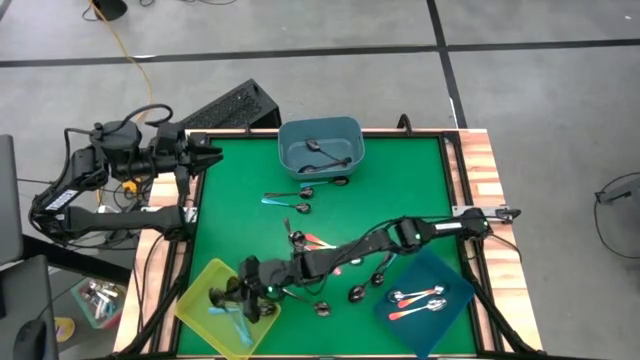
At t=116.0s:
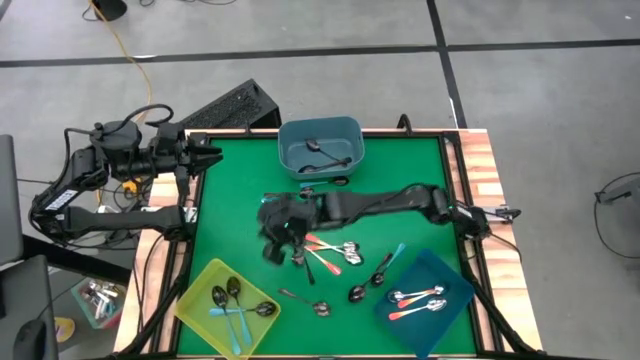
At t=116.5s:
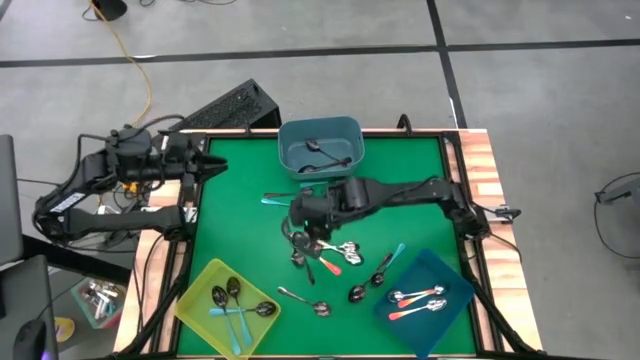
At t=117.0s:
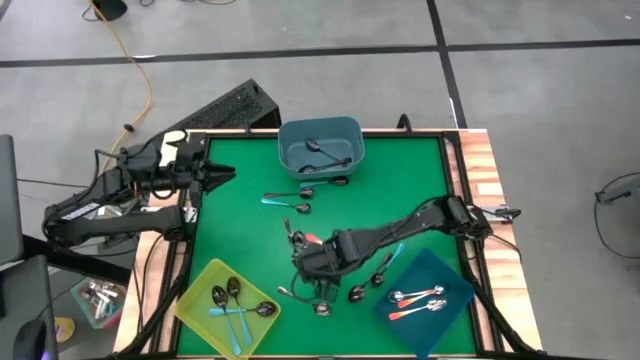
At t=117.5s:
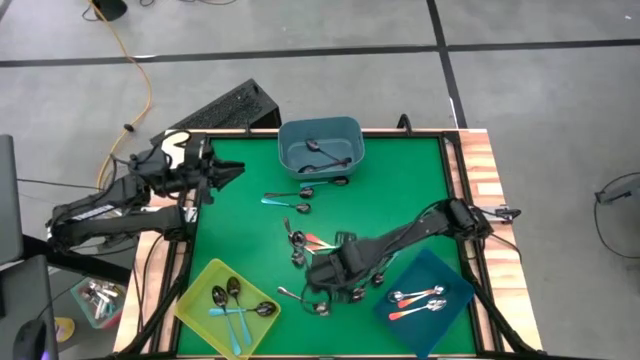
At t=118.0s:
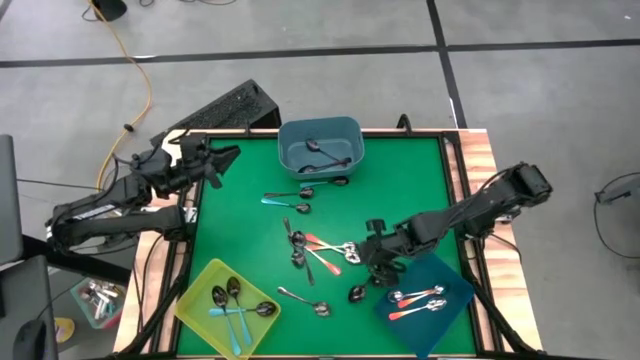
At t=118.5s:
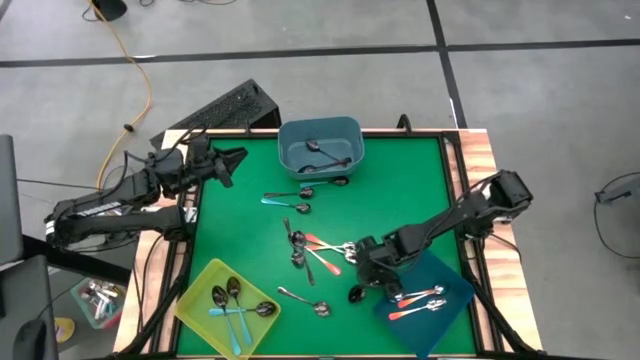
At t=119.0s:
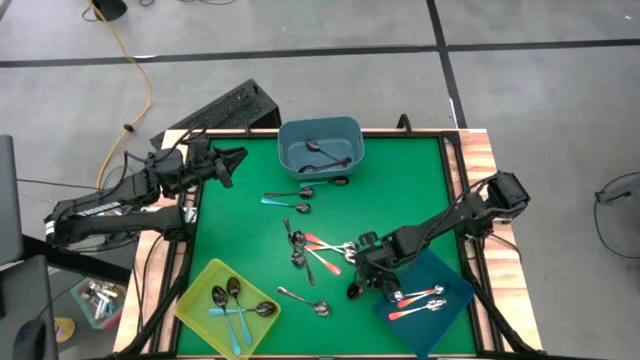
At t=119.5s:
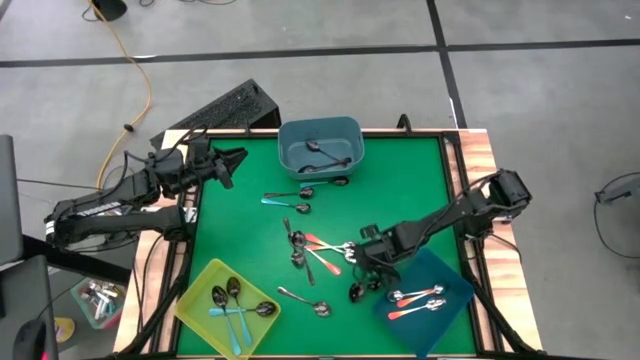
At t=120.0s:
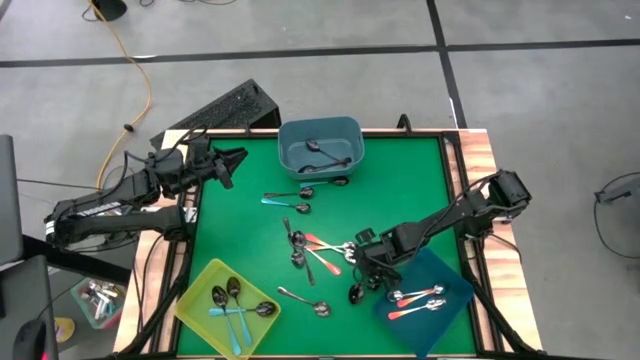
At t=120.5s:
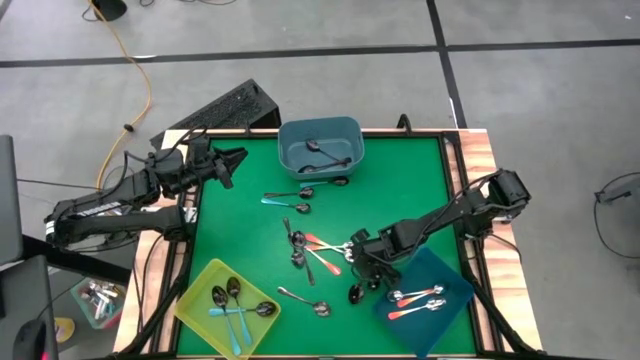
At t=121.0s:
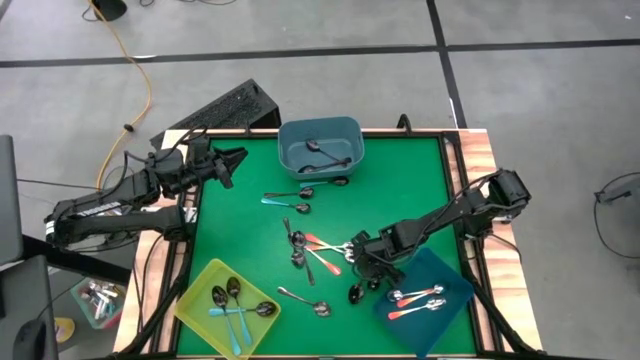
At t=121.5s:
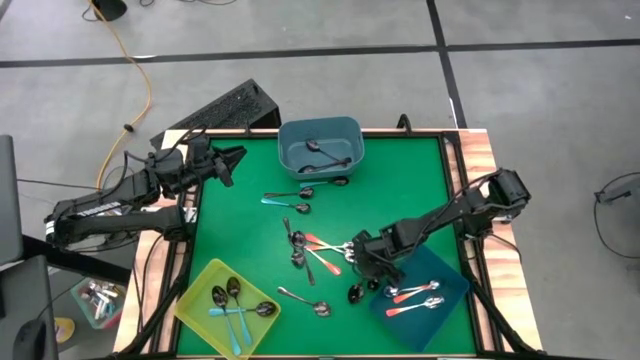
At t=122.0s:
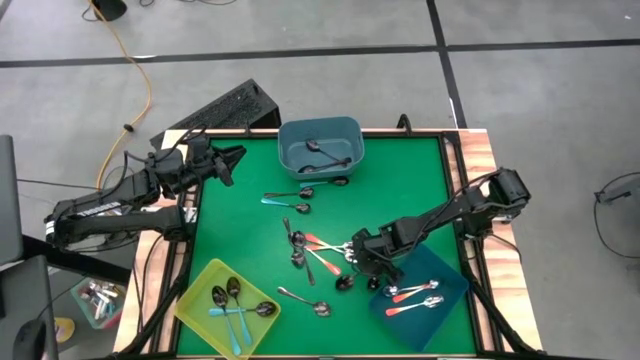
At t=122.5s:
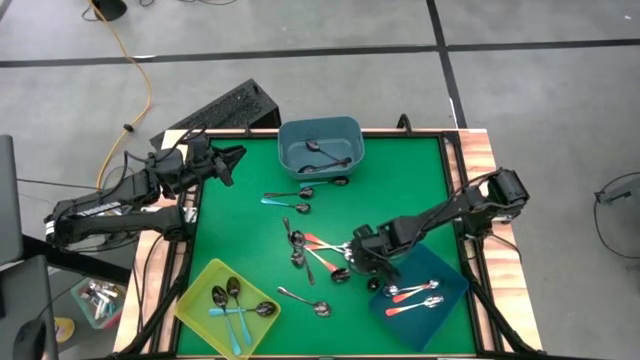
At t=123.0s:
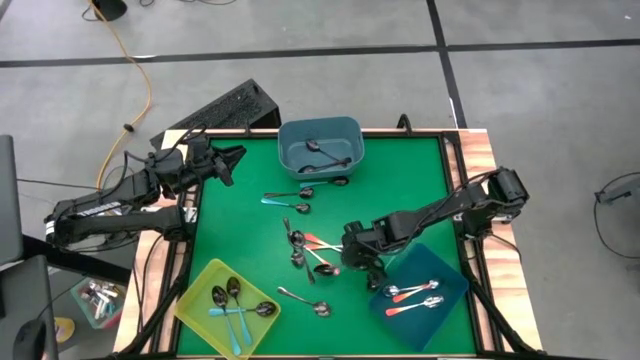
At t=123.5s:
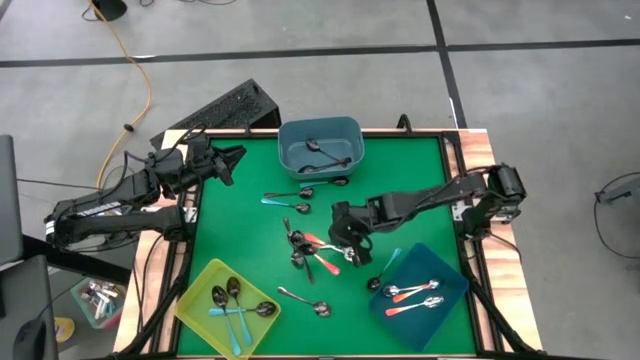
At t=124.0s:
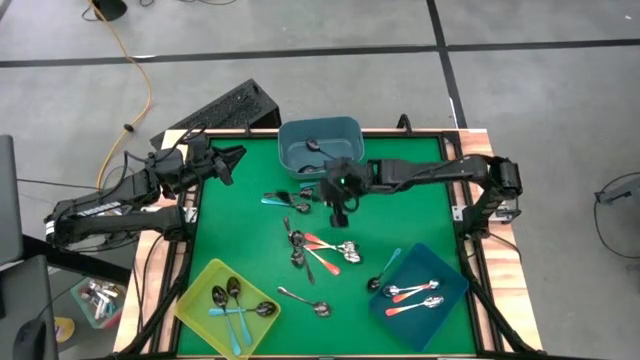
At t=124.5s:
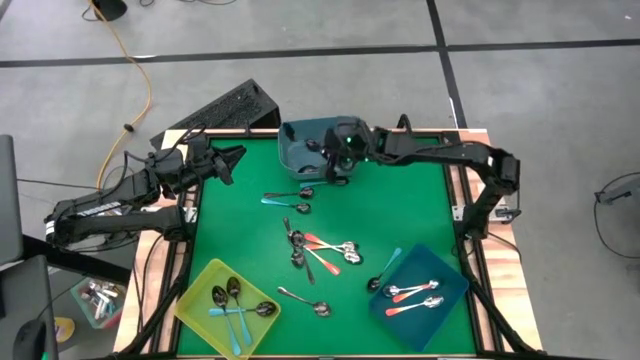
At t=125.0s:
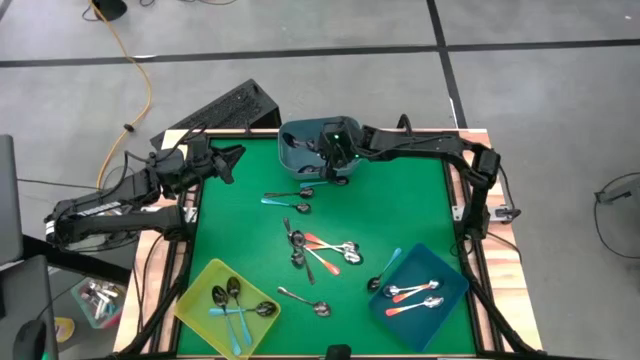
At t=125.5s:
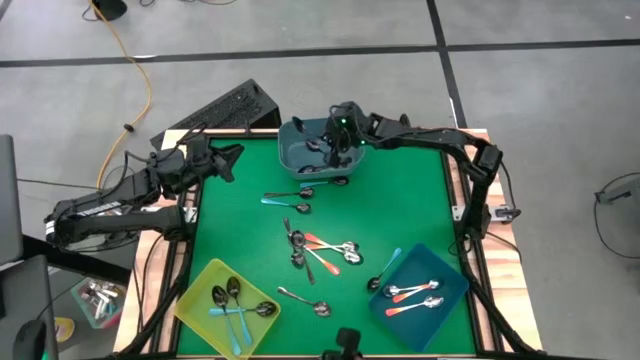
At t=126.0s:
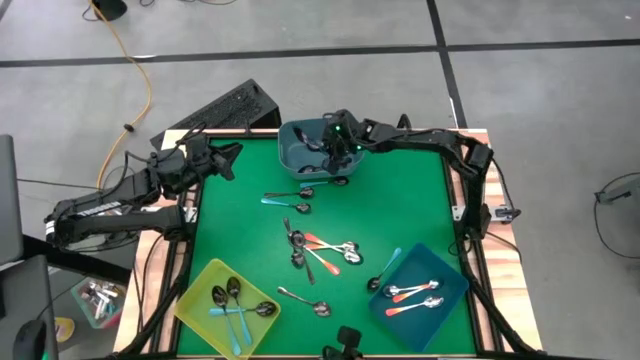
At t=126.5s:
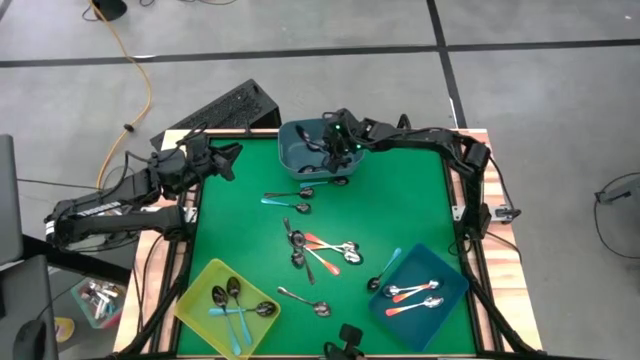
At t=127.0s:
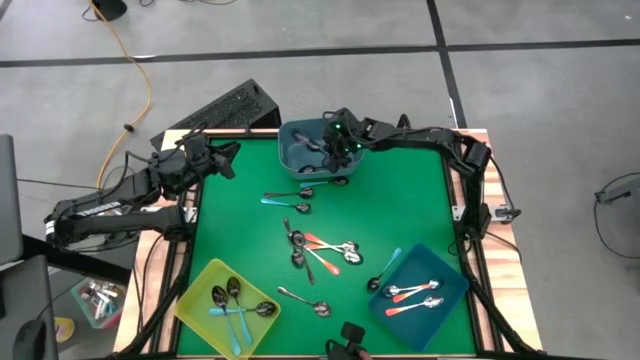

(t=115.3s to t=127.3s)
Task: Sort silverware by color (type)
Put the black spoon into the light blue bin

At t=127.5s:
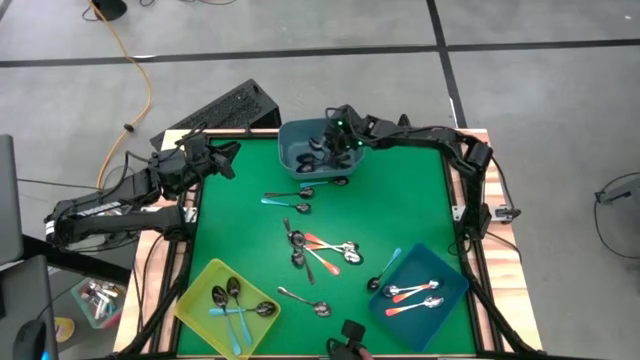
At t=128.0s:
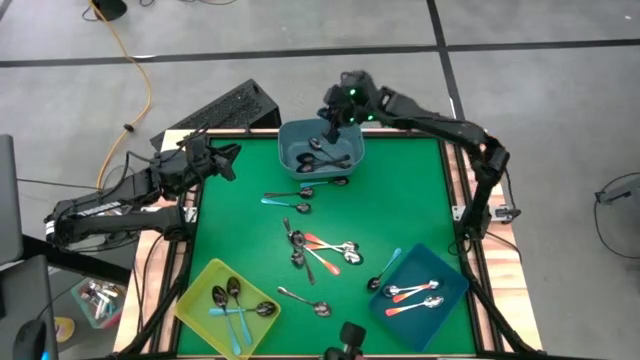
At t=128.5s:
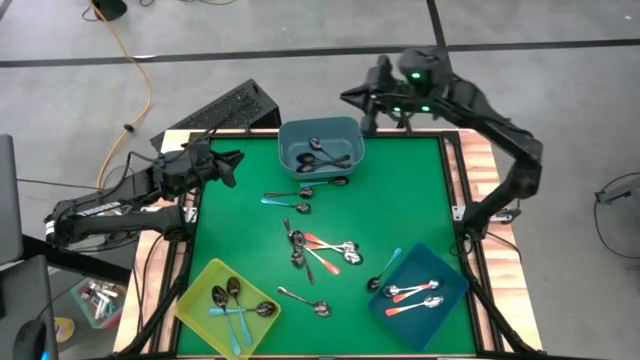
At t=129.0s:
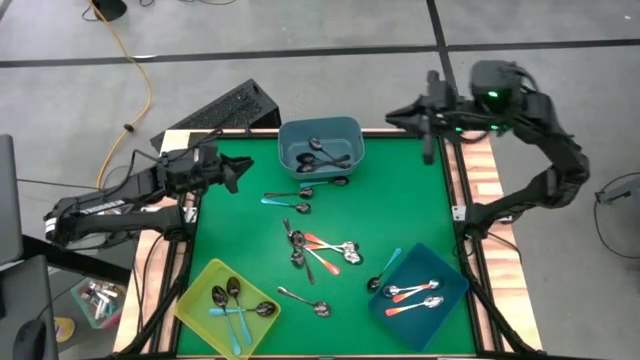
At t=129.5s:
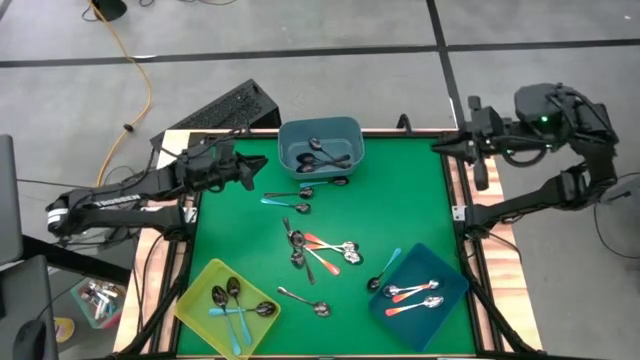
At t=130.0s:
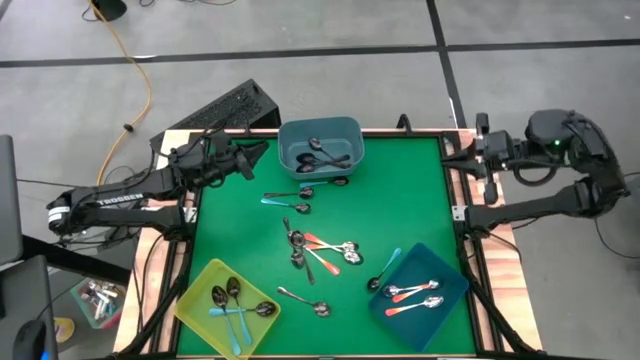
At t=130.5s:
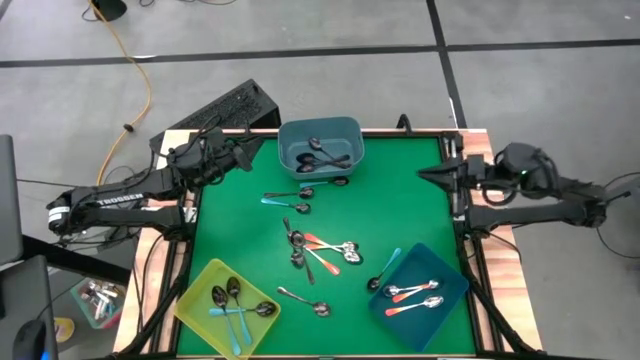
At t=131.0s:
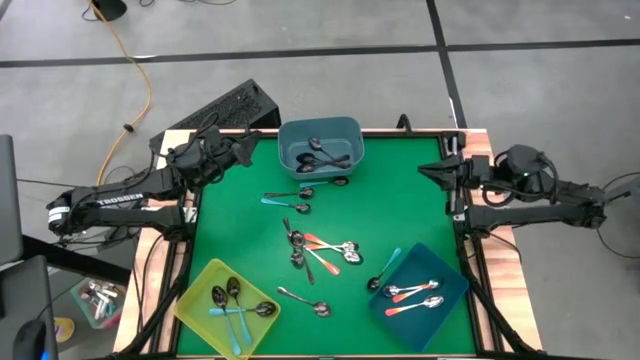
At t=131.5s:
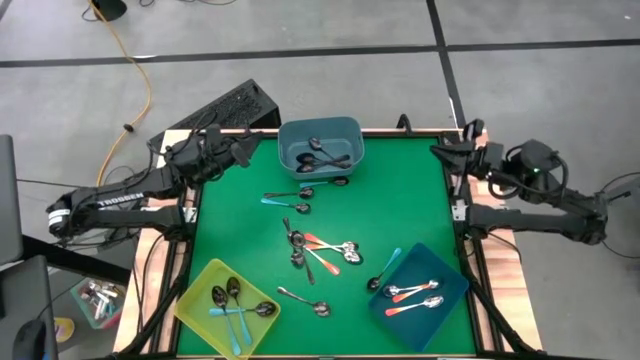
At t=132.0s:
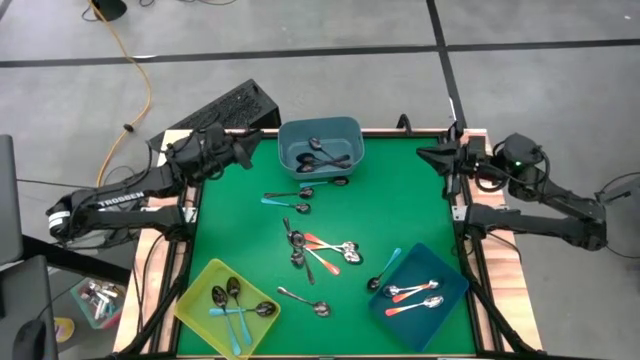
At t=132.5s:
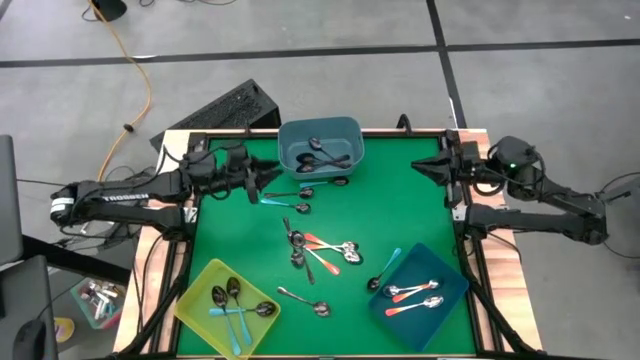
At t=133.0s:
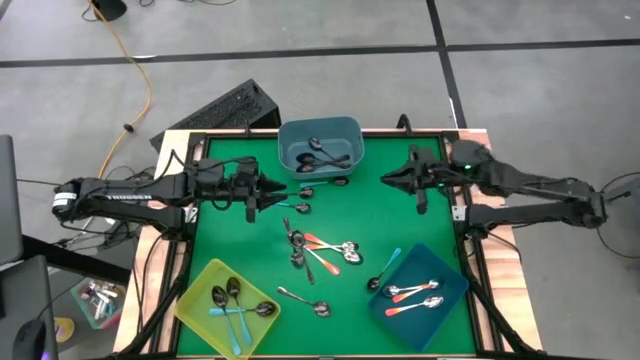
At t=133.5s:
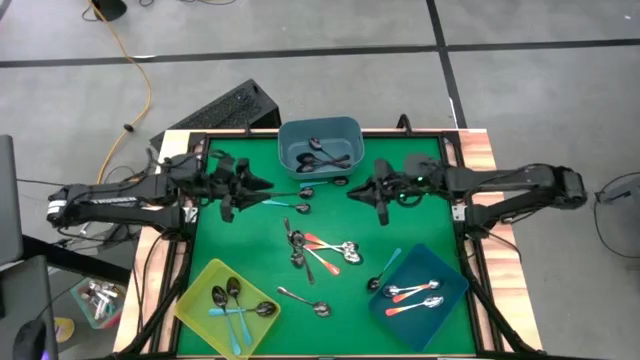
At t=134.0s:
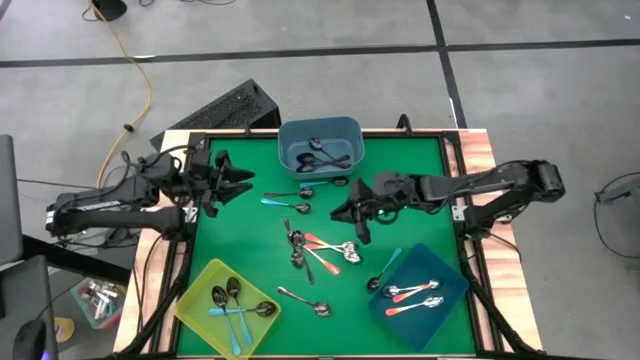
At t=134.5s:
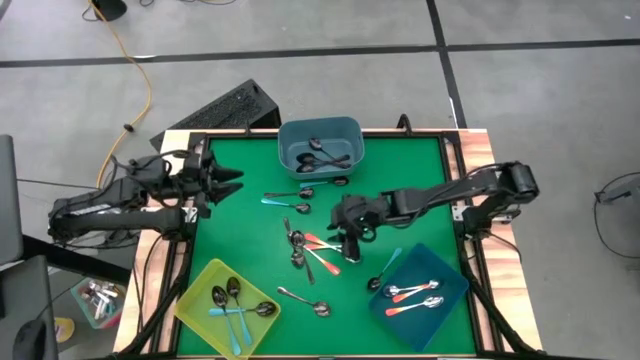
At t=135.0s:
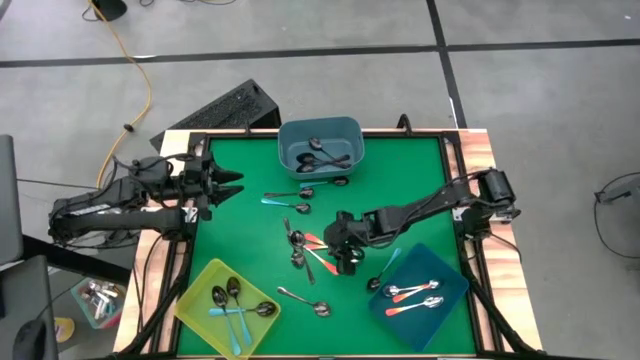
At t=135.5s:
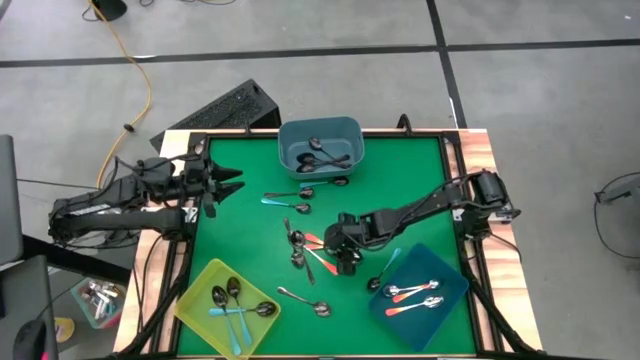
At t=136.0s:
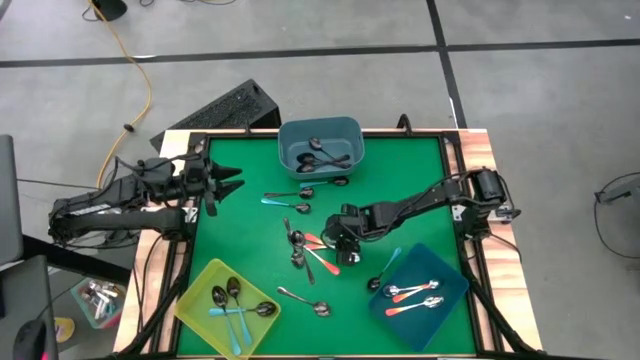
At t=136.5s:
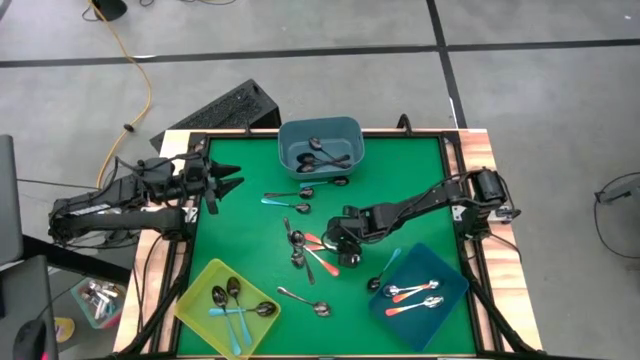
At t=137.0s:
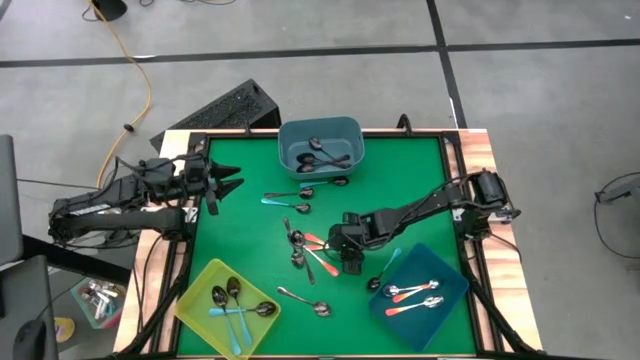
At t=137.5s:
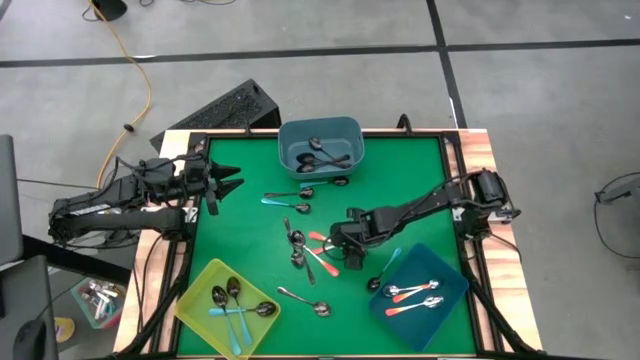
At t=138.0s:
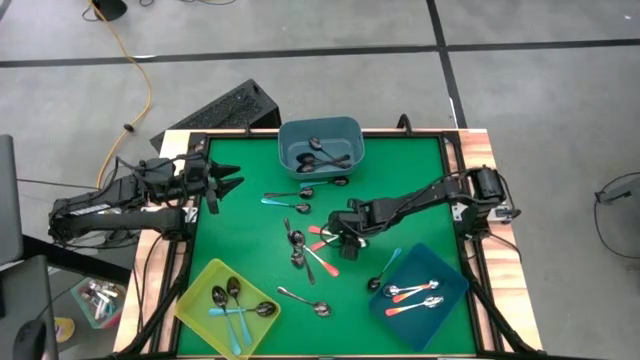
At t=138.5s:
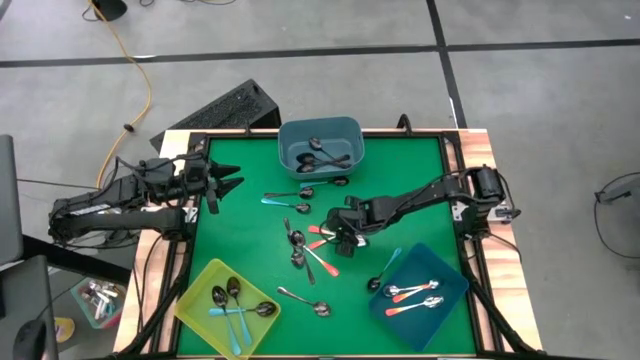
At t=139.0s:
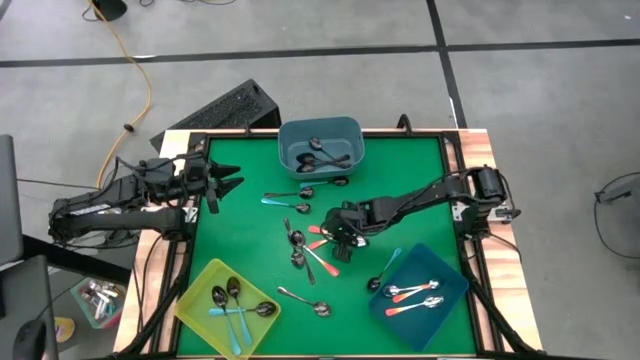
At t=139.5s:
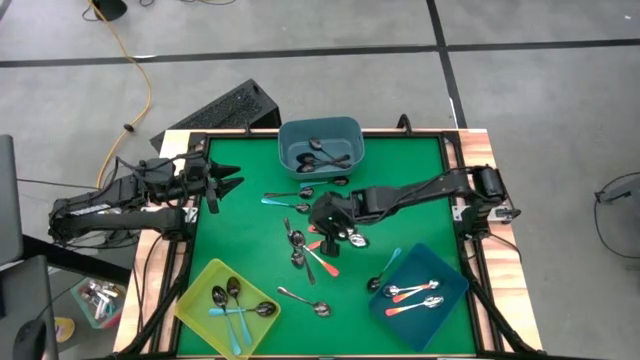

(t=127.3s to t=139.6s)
Put the orange spoon into the blue bin
